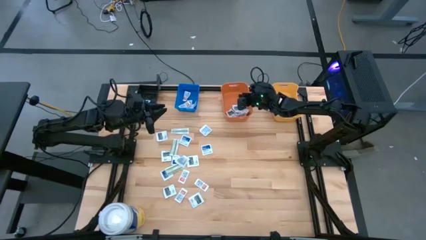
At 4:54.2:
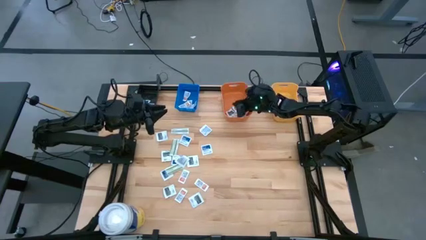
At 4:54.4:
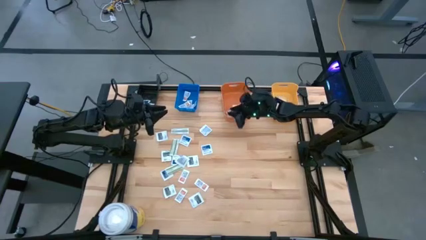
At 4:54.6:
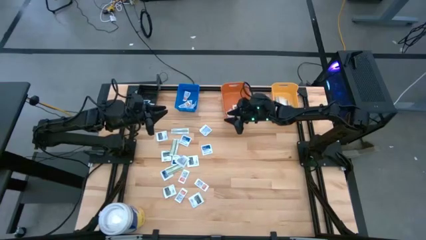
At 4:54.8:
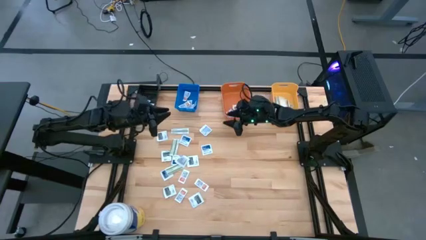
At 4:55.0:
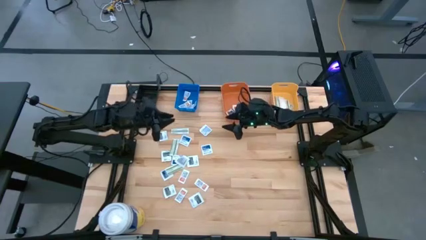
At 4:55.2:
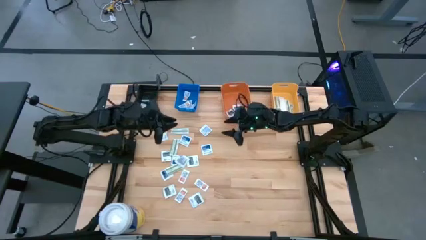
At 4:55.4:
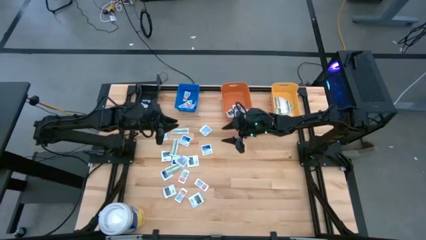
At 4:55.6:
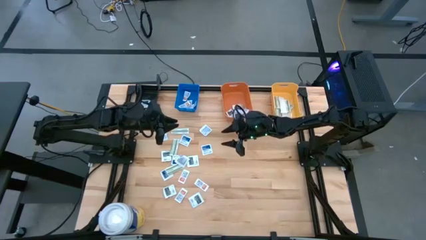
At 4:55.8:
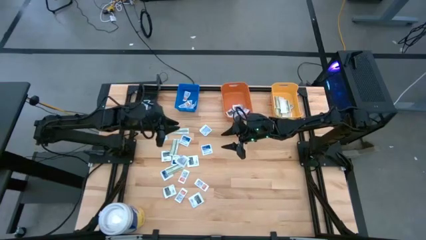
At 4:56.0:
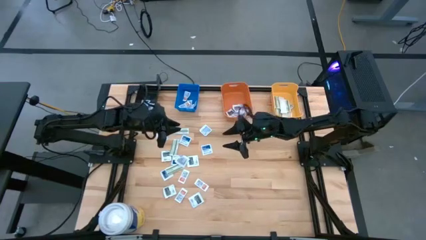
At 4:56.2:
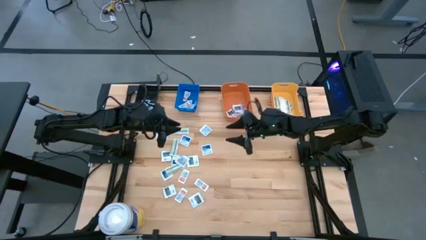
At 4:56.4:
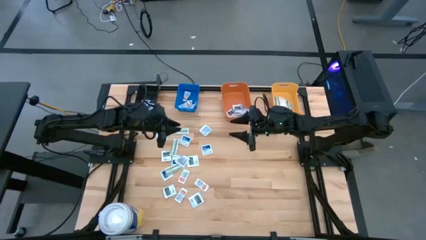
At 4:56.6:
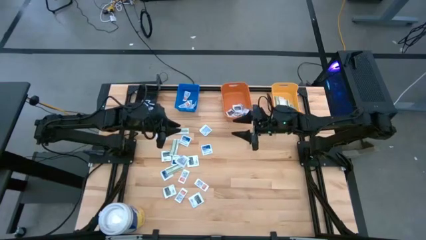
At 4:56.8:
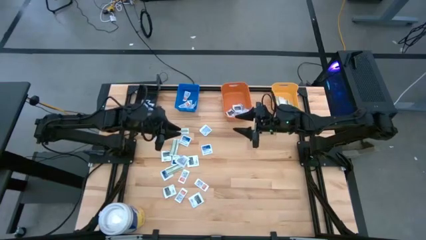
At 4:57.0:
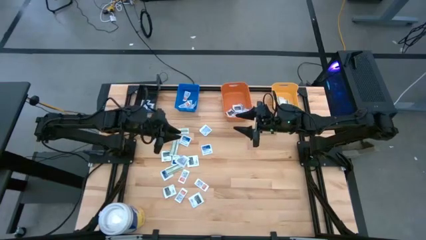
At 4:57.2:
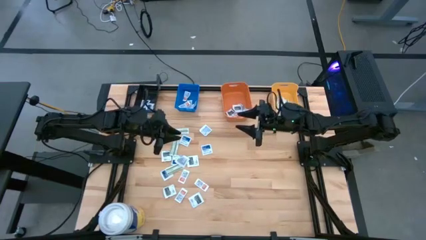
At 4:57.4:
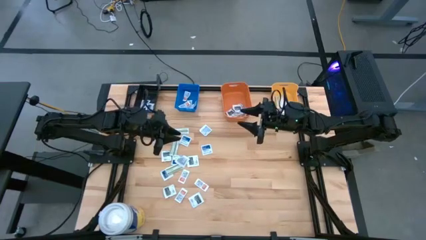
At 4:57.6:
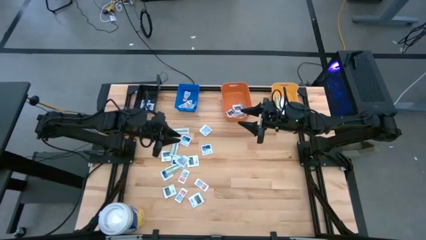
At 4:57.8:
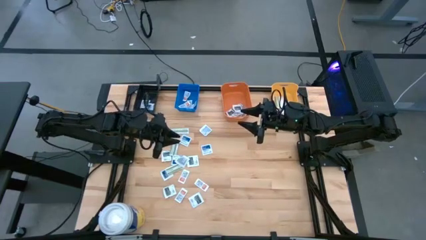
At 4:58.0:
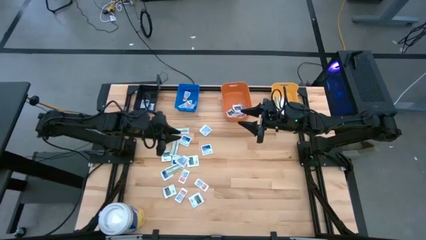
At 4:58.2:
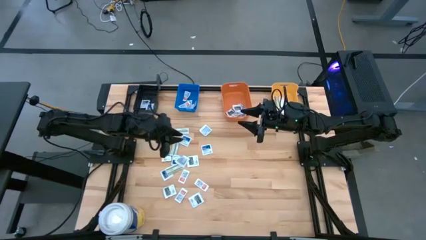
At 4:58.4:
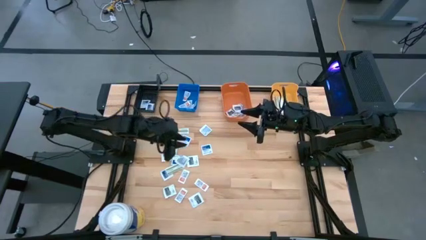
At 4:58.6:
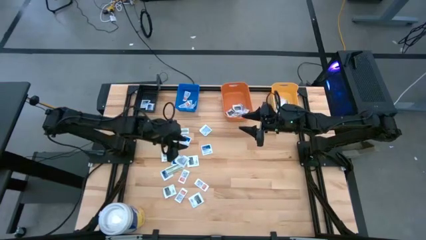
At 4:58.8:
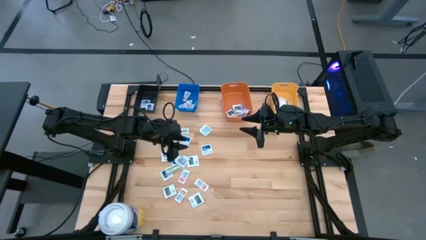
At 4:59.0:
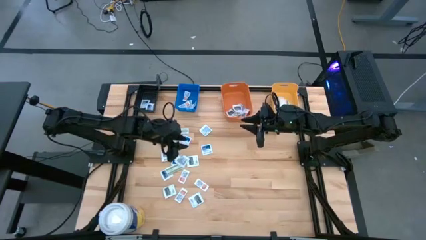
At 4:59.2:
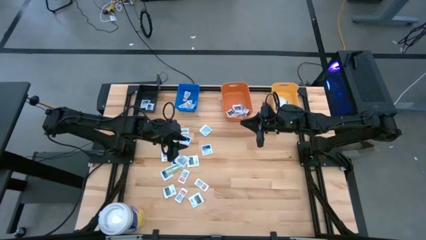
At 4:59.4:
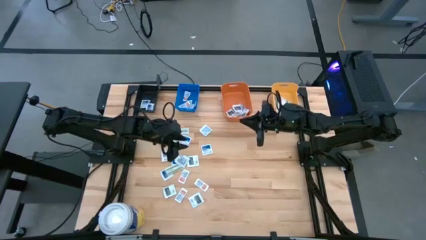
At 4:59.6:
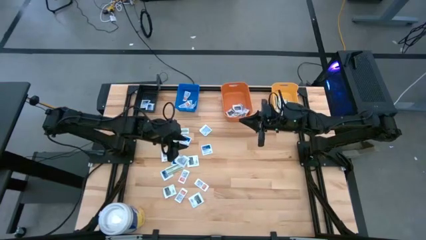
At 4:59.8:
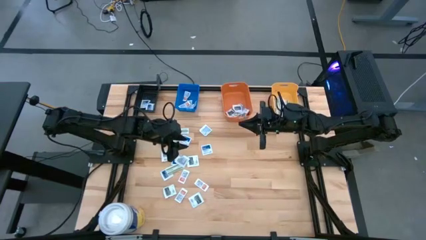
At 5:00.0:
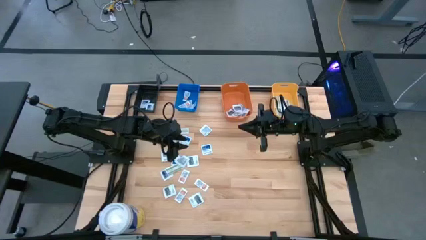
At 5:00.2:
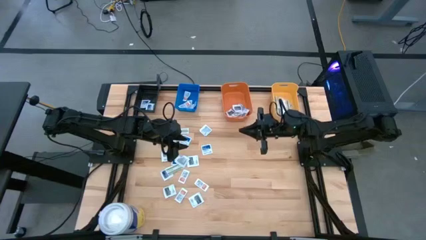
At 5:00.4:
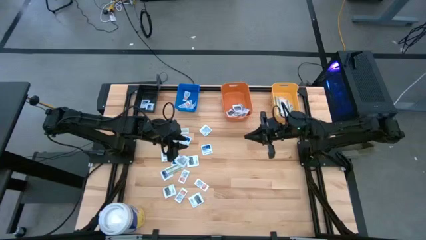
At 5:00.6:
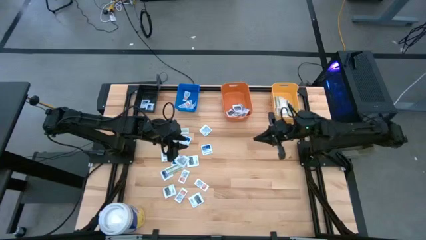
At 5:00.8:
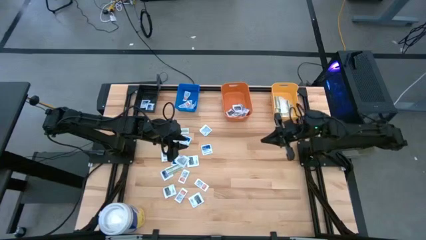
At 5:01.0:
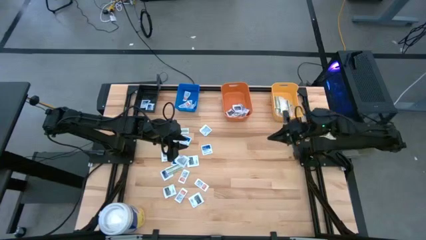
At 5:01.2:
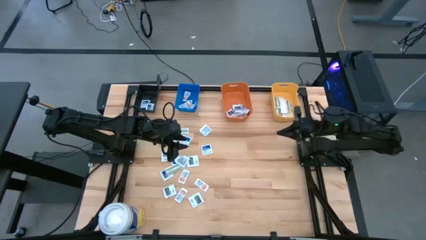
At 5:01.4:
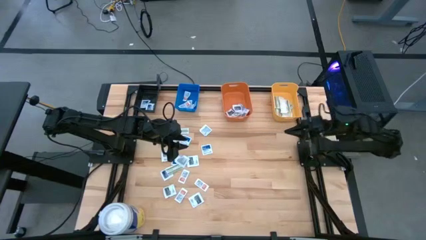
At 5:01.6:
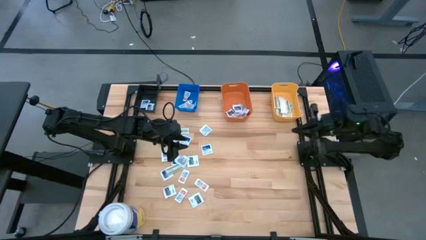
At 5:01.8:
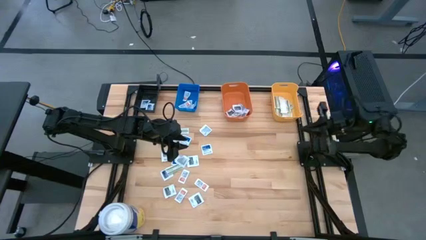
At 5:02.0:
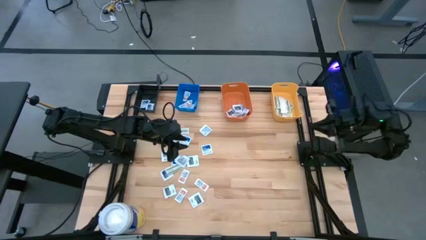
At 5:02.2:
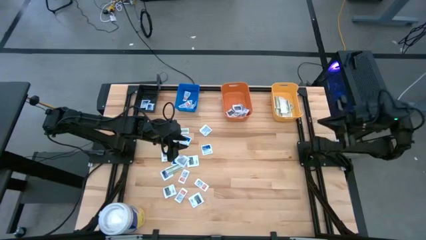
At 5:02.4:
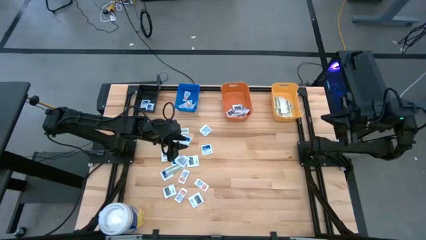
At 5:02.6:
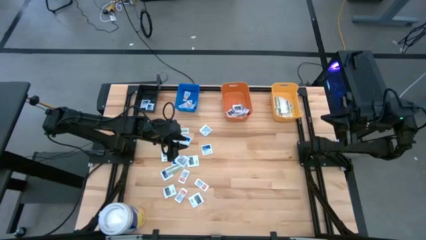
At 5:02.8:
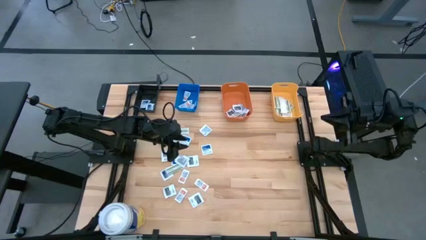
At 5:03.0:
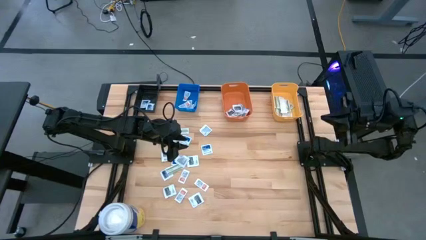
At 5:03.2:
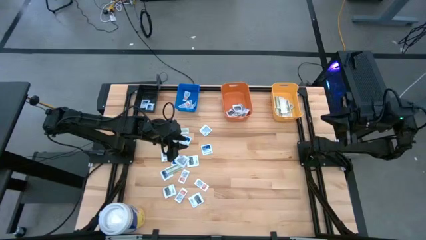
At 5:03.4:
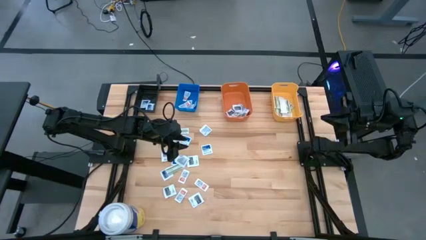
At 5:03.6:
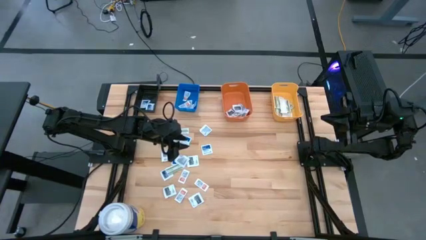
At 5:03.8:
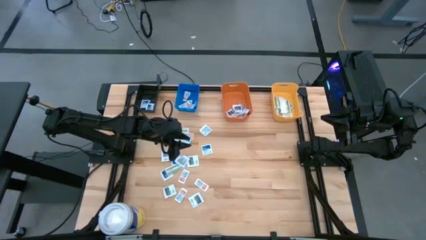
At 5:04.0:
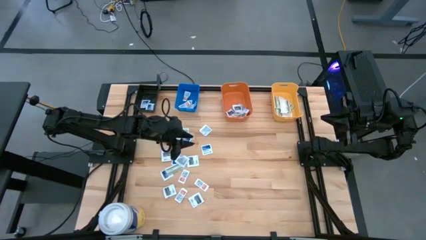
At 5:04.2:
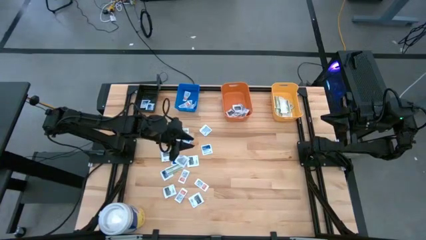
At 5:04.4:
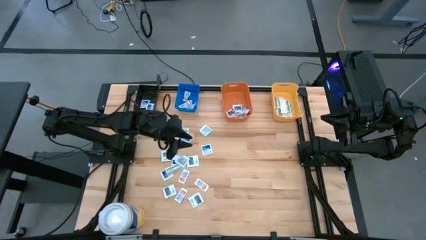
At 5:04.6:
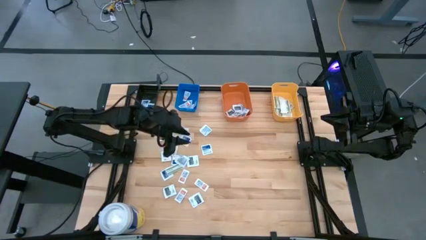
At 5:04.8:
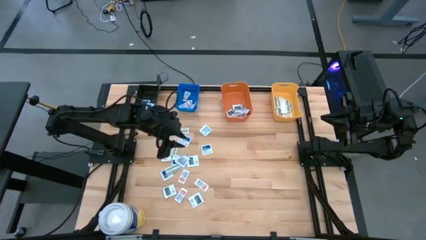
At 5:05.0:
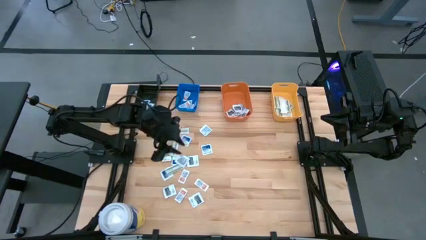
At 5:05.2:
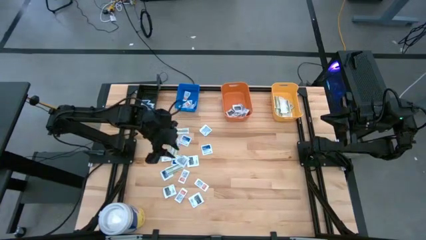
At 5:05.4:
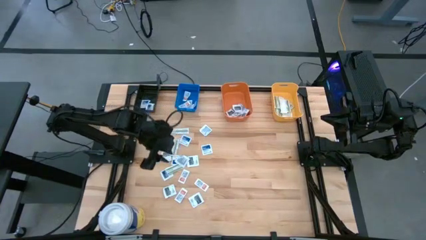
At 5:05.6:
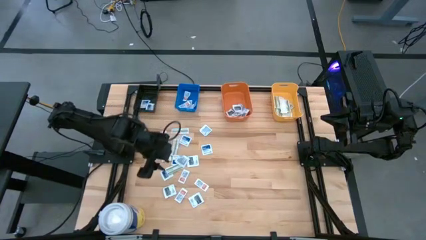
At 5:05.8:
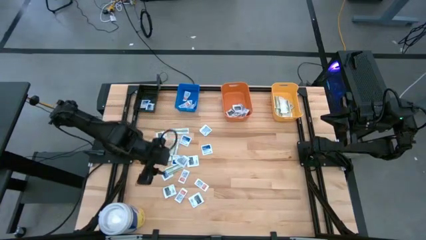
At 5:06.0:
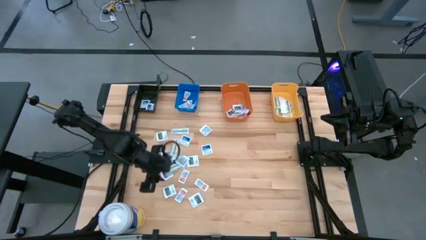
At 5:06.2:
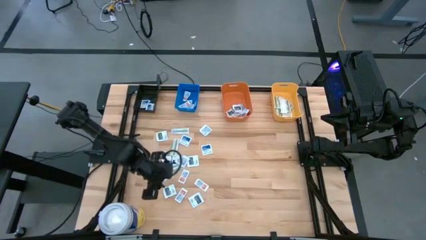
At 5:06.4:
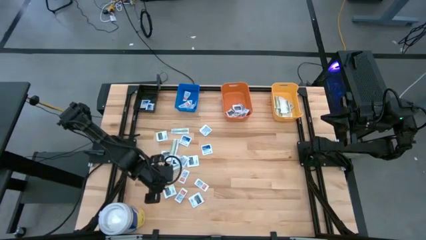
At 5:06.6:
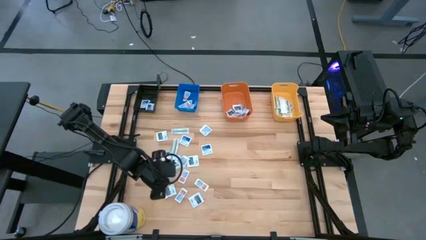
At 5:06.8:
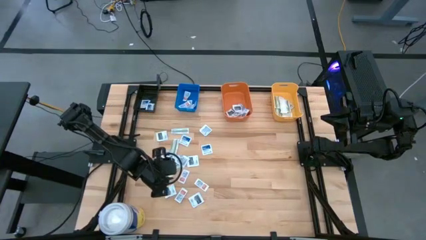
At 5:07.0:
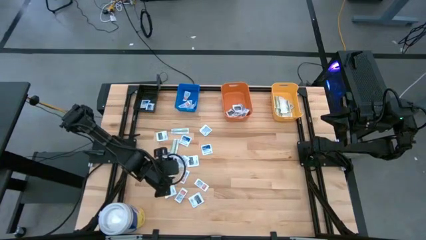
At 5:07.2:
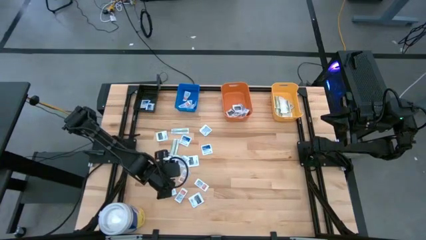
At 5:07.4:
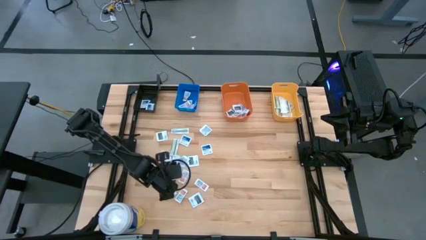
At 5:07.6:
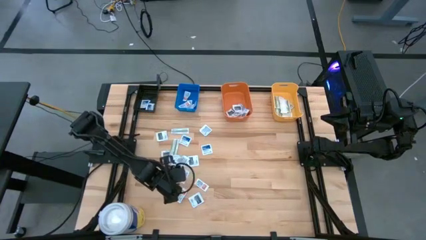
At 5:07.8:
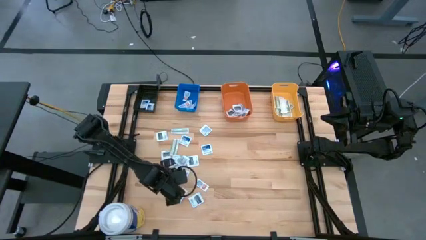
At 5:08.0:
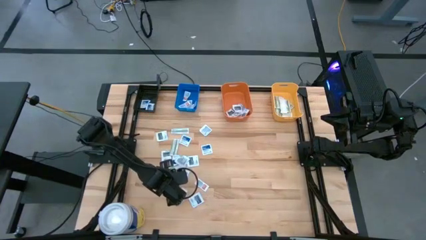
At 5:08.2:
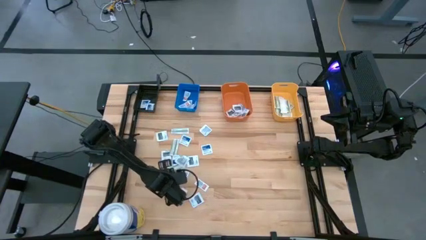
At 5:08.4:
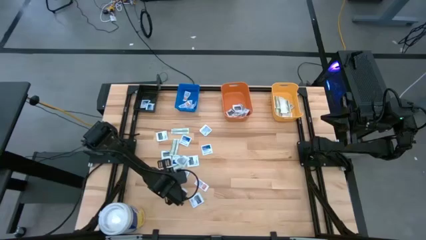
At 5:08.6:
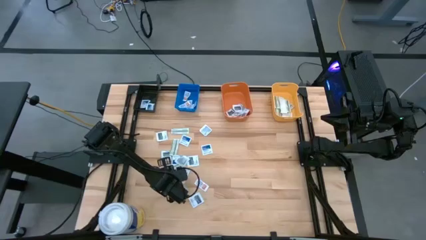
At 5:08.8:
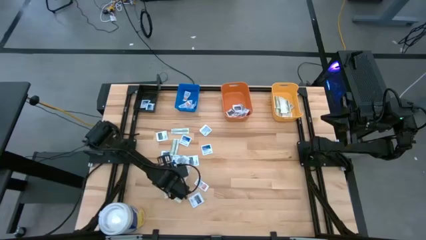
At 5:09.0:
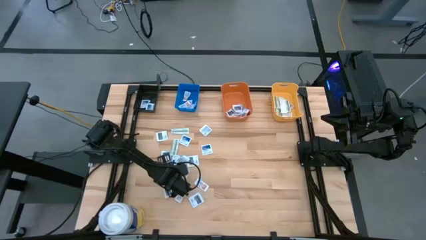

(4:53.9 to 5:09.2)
Task: Pick & Place First Aid Supplies
Put the bandage into the yellow bin
